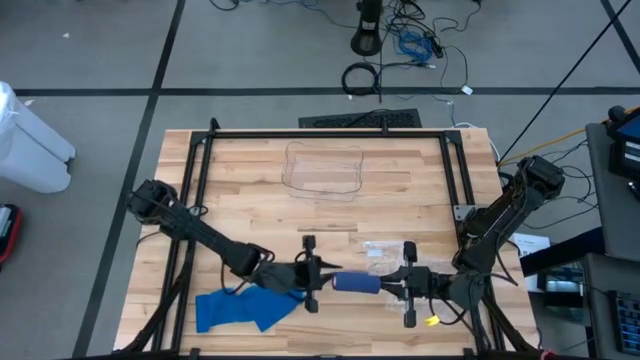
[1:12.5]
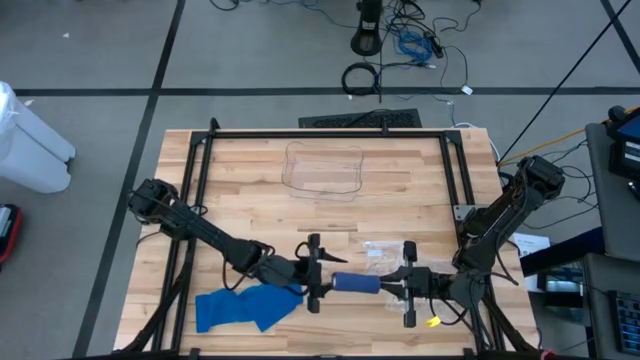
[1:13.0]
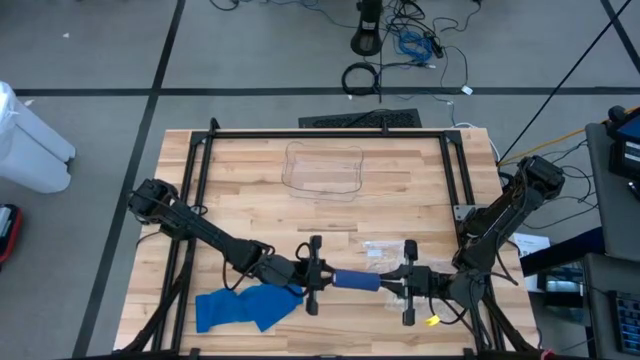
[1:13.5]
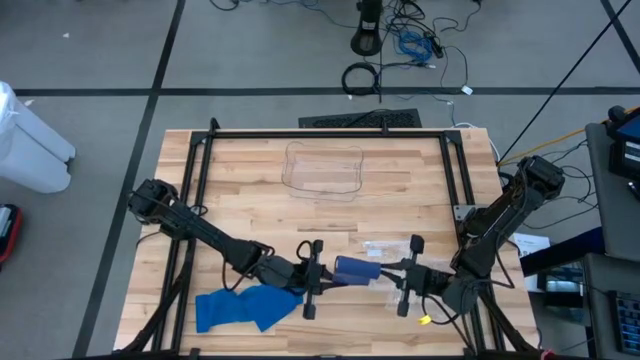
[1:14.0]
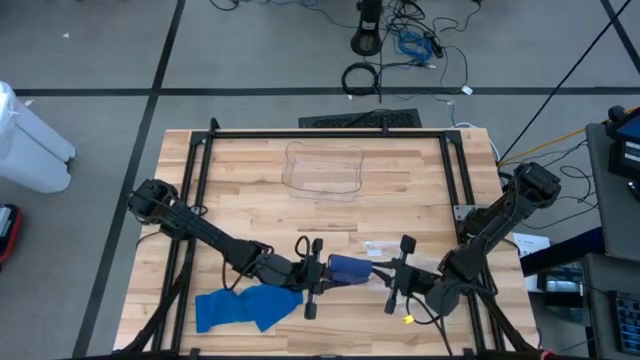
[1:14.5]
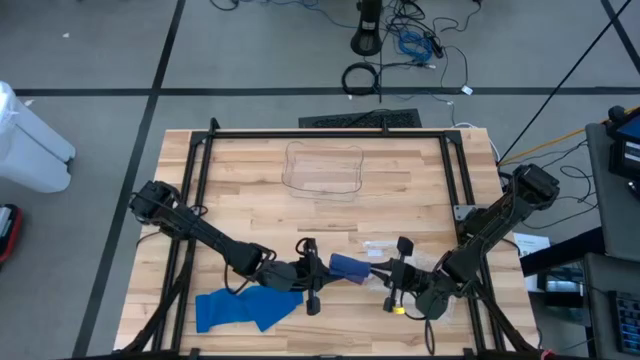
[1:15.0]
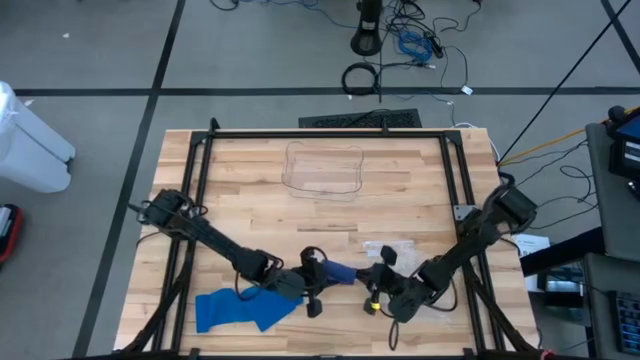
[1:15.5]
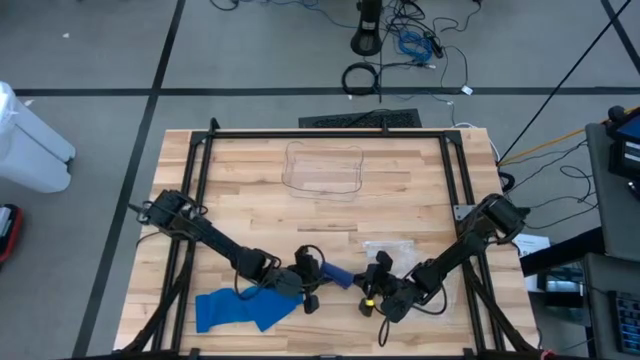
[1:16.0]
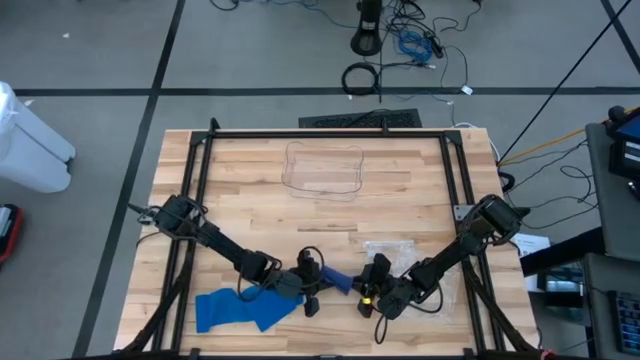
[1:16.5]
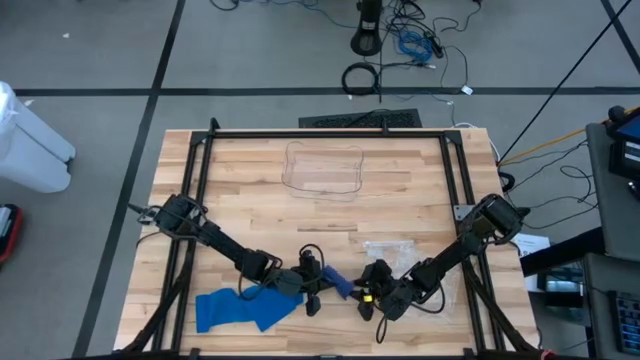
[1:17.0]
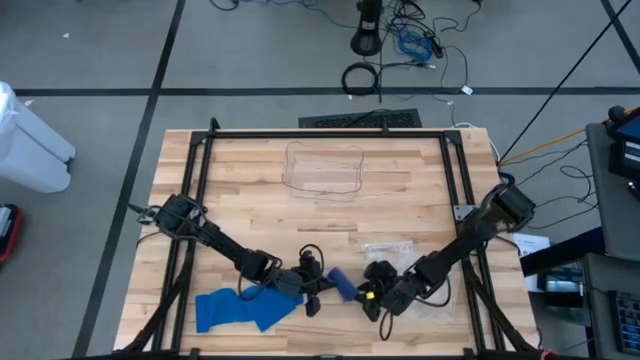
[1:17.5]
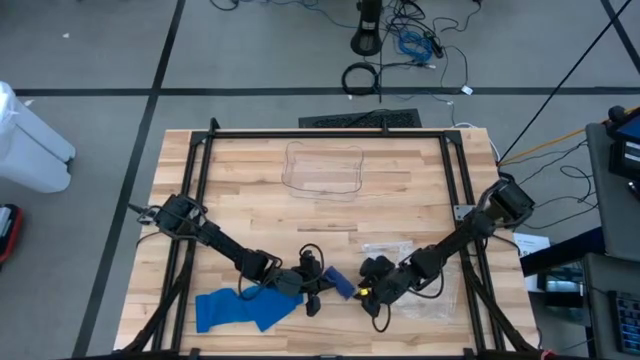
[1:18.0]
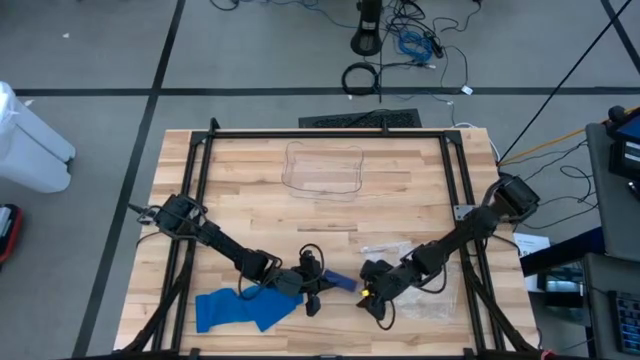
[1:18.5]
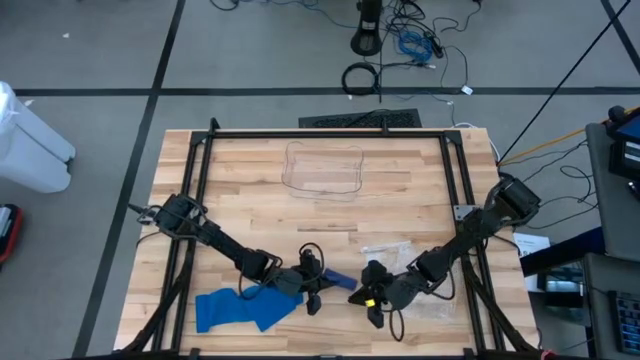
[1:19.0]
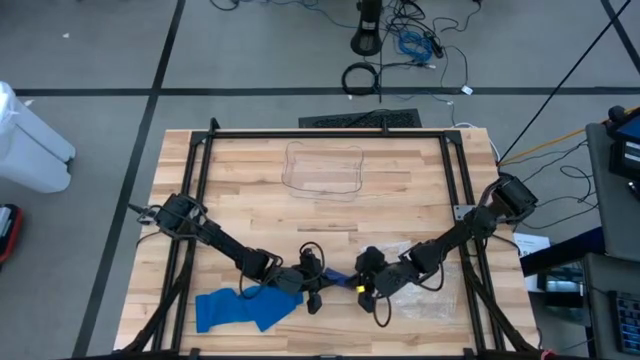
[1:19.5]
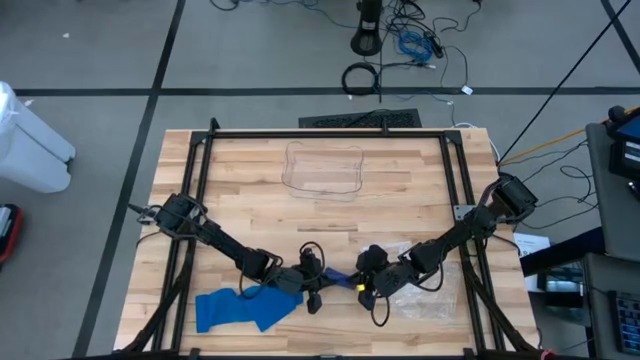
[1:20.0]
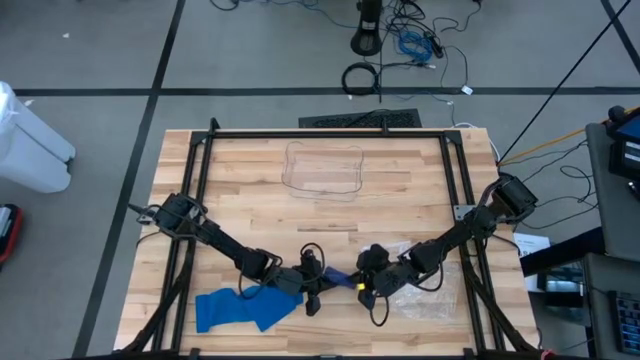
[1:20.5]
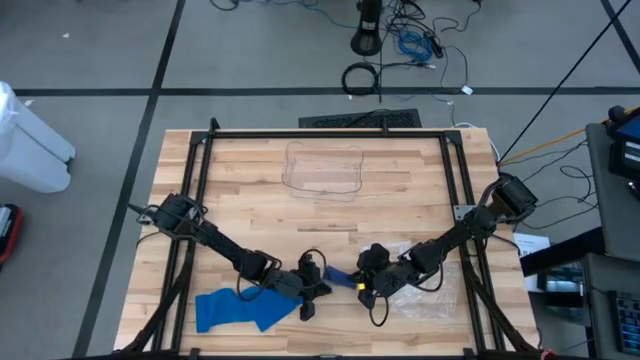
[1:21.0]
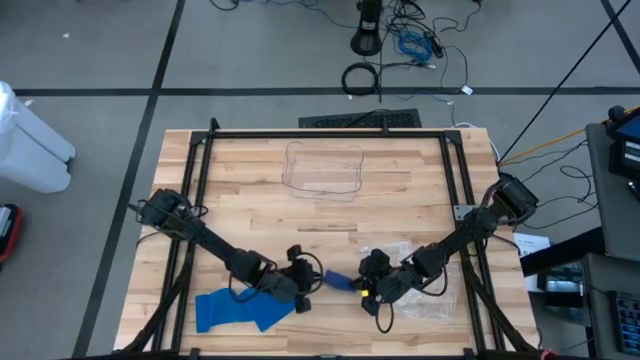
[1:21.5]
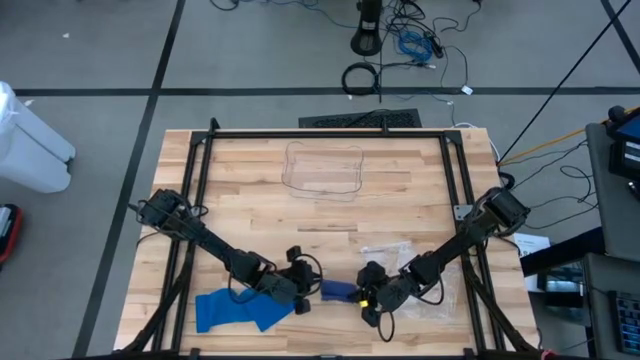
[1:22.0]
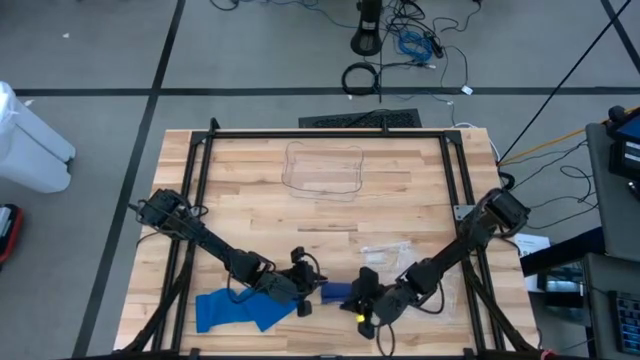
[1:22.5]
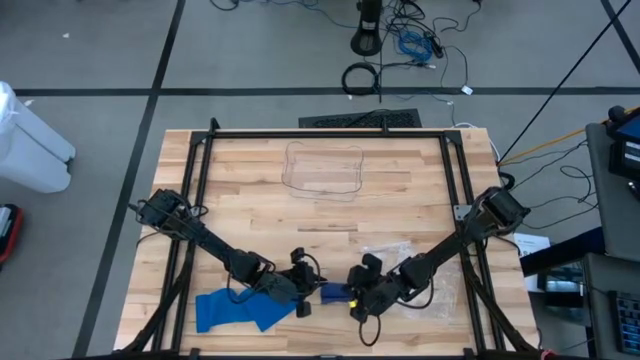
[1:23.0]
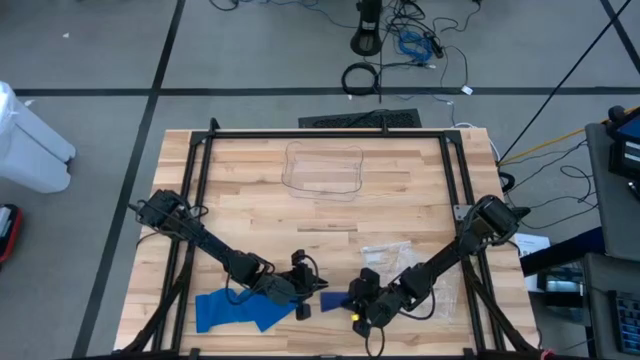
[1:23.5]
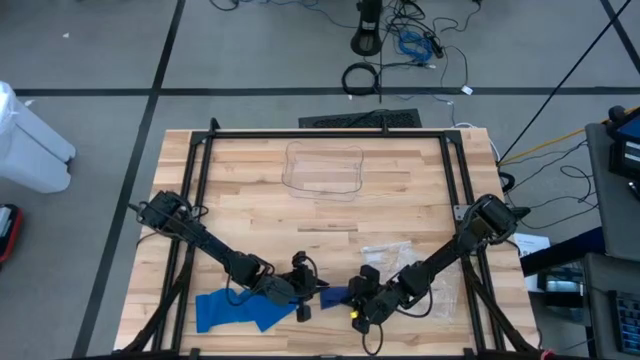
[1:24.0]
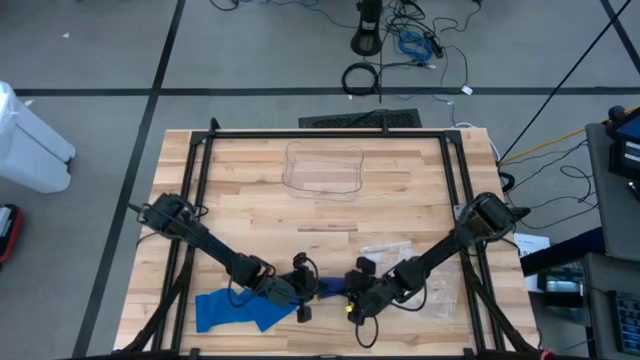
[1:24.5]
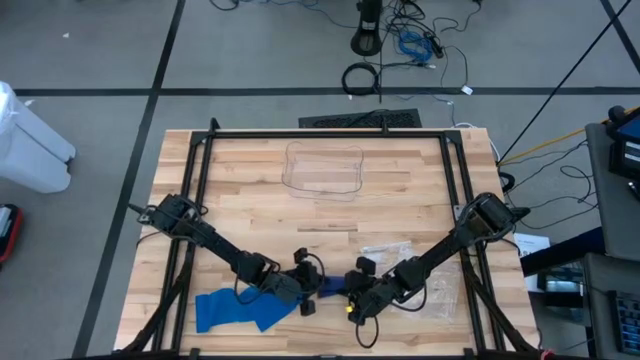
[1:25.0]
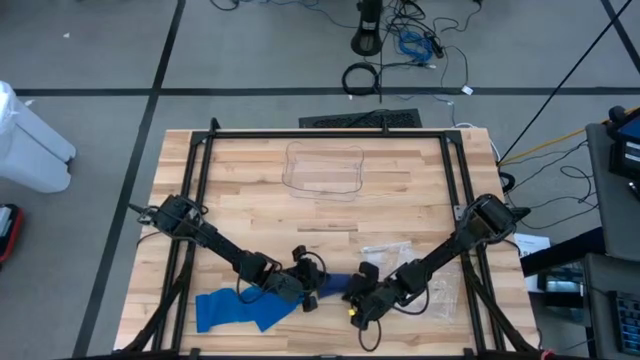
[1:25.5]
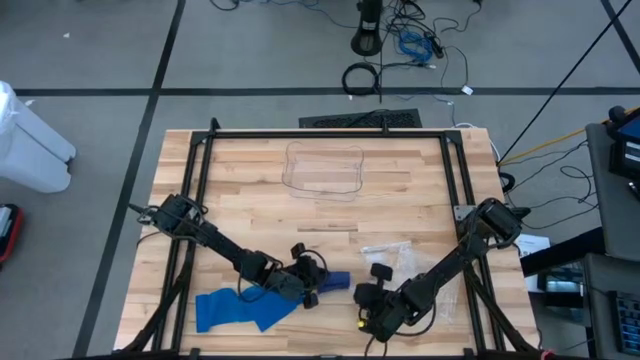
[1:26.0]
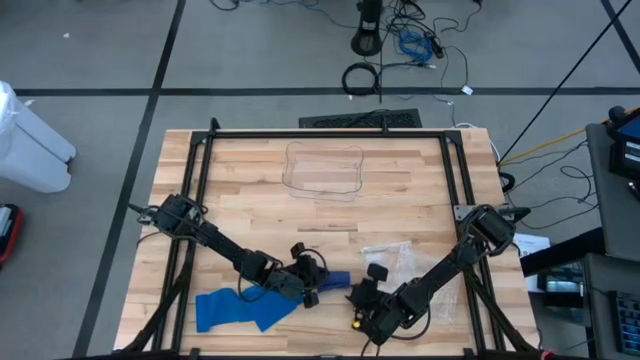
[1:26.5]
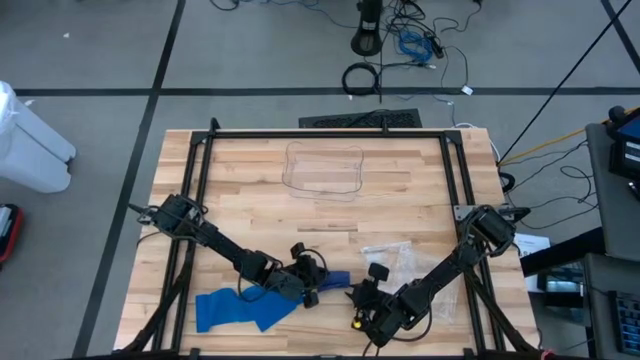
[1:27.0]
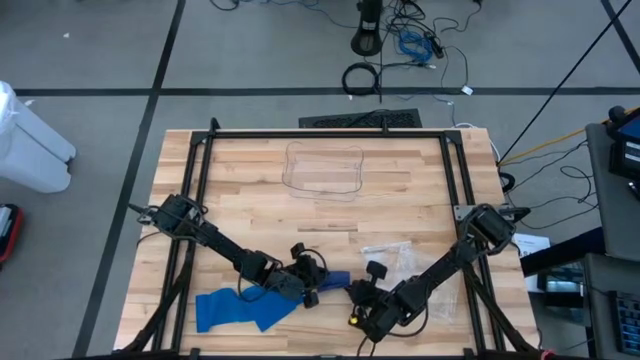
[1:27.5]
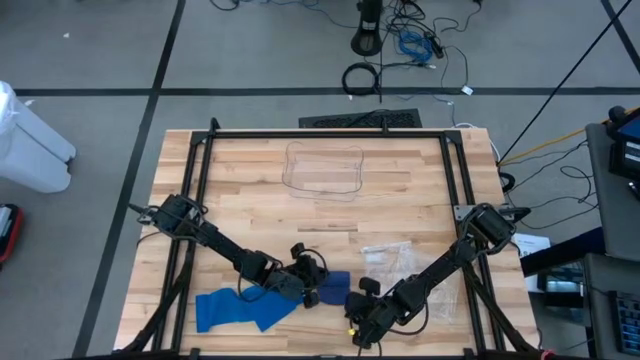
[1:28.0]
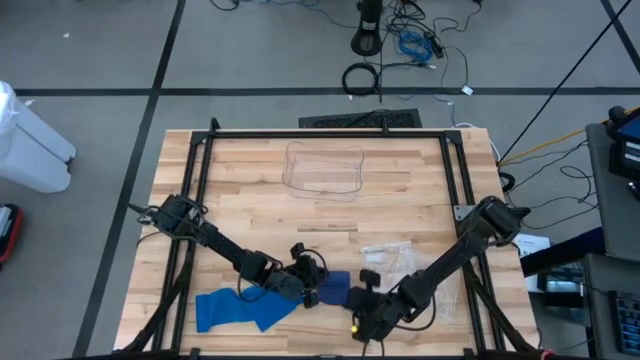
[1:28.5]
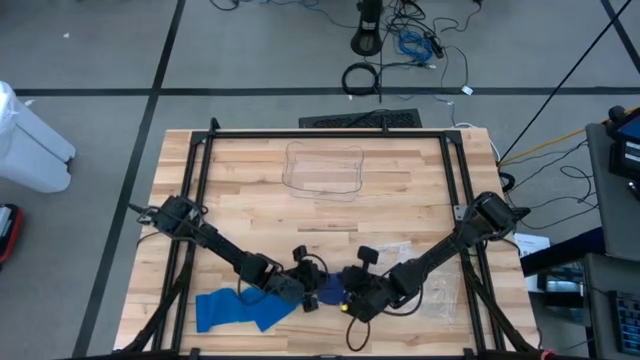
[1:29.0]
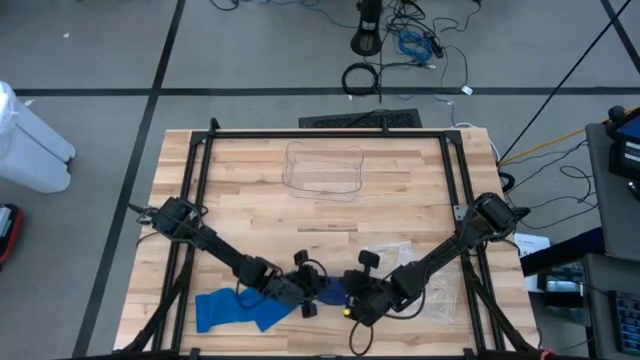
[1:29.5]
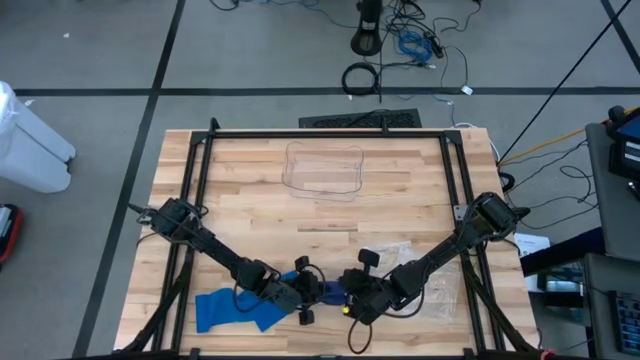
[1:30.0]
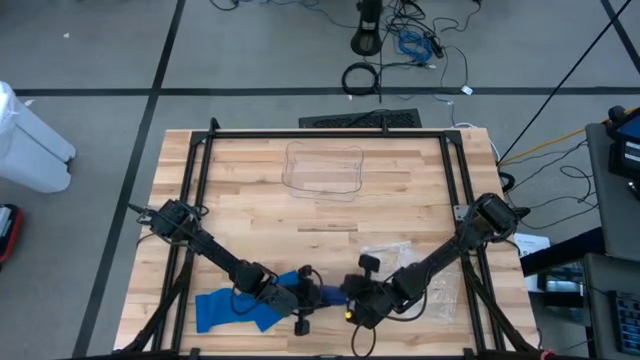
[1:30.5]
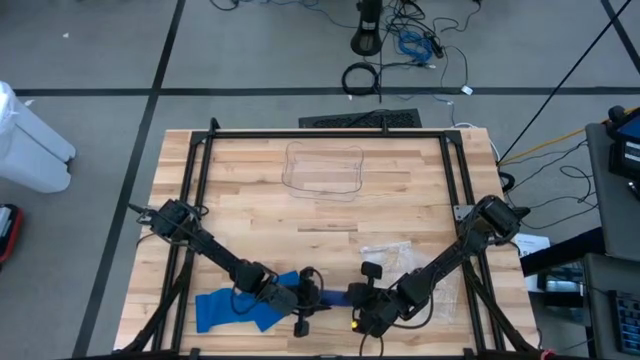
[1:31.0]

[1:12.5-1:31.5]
Task: Roll bandage
Roll the purple bandage
